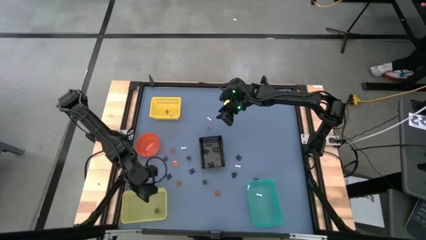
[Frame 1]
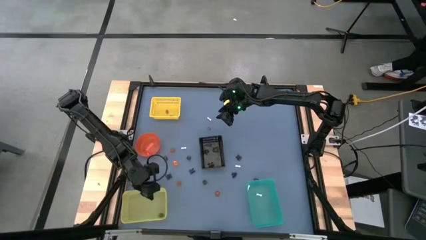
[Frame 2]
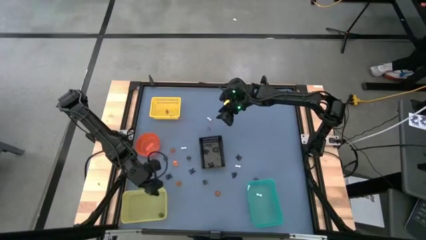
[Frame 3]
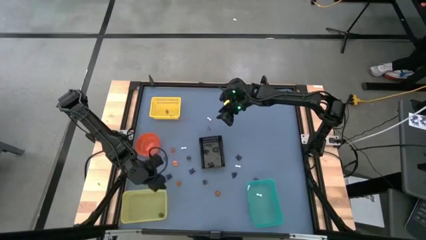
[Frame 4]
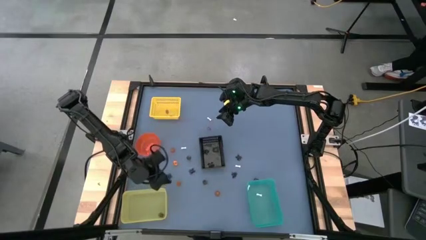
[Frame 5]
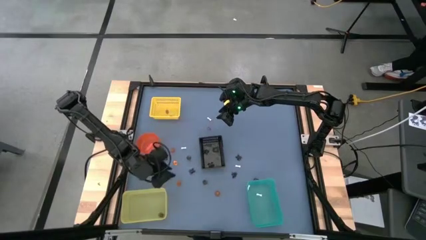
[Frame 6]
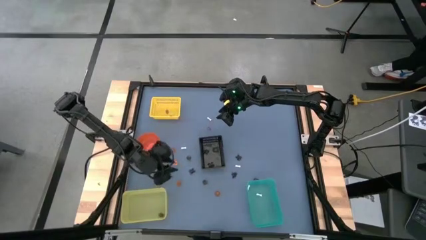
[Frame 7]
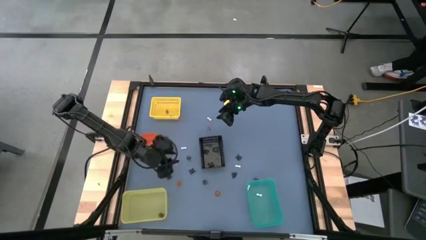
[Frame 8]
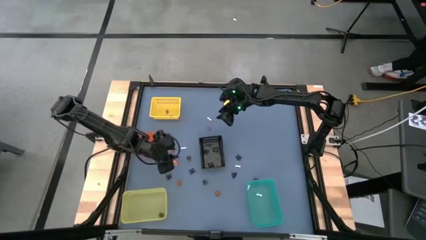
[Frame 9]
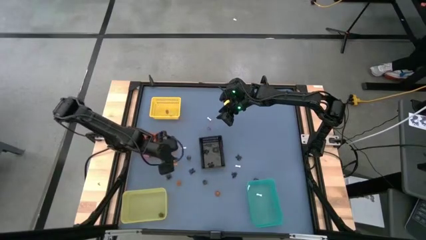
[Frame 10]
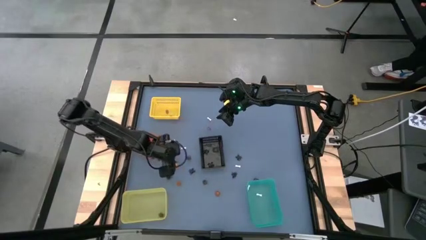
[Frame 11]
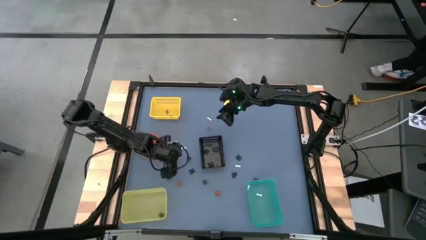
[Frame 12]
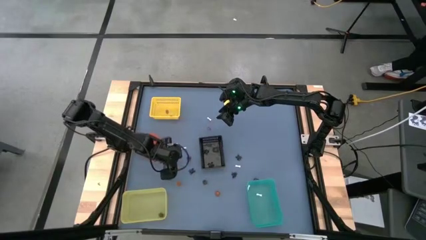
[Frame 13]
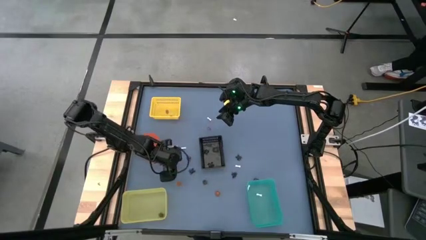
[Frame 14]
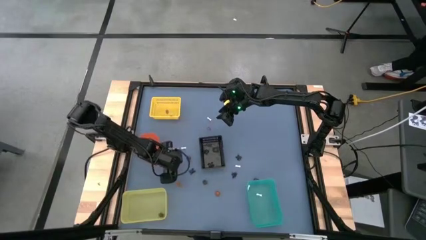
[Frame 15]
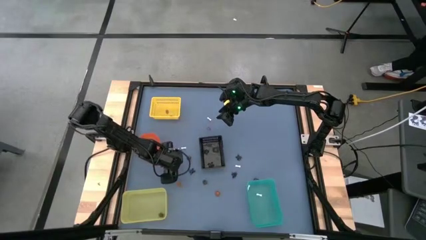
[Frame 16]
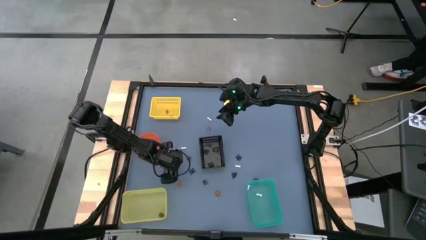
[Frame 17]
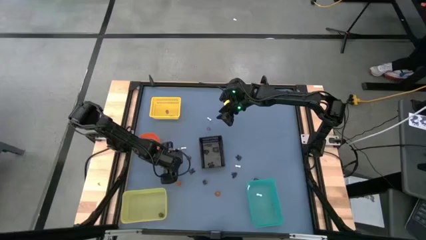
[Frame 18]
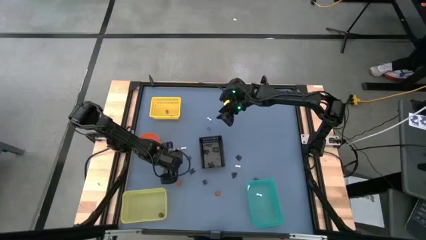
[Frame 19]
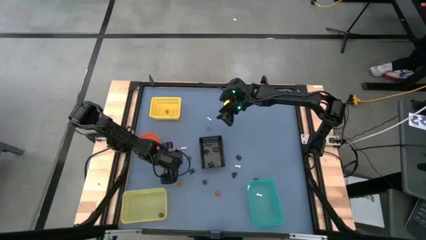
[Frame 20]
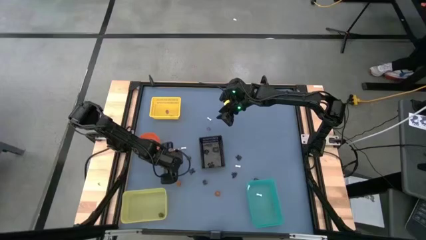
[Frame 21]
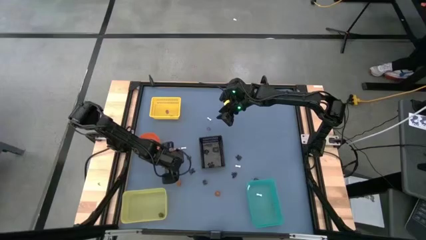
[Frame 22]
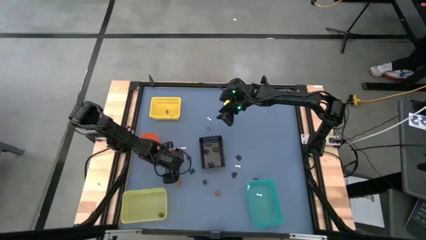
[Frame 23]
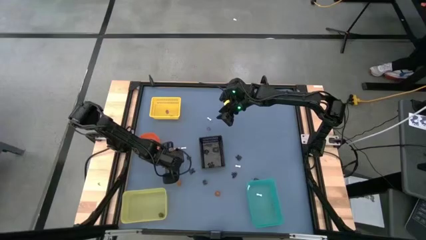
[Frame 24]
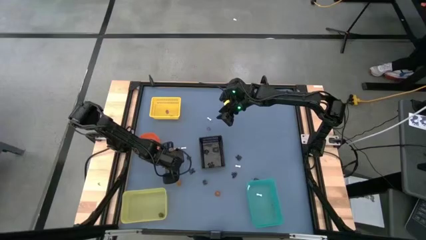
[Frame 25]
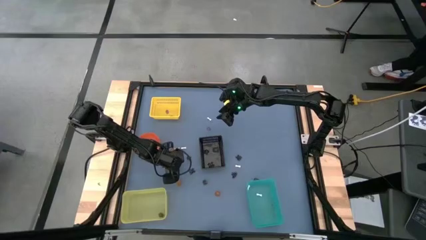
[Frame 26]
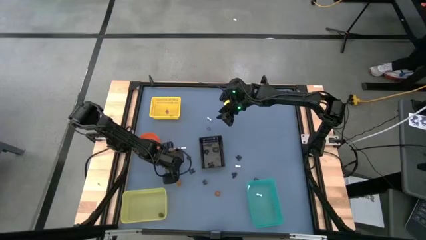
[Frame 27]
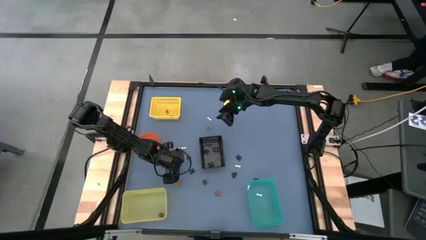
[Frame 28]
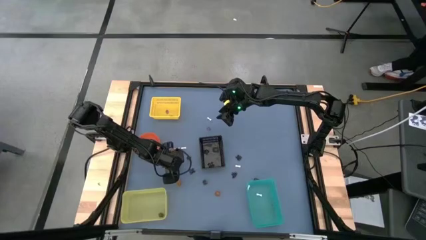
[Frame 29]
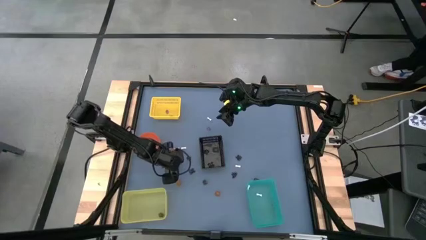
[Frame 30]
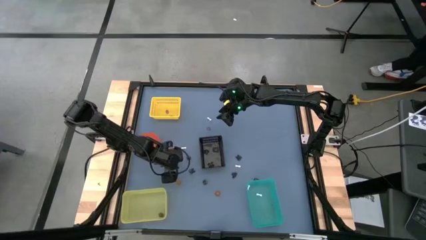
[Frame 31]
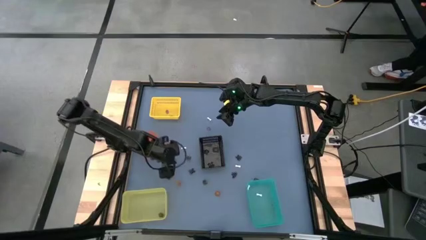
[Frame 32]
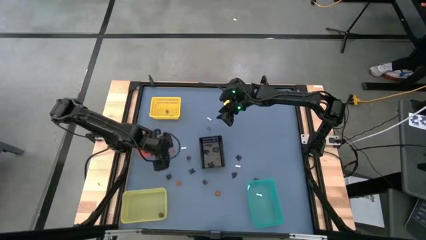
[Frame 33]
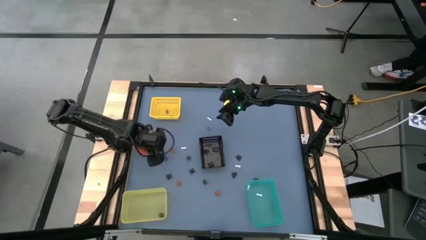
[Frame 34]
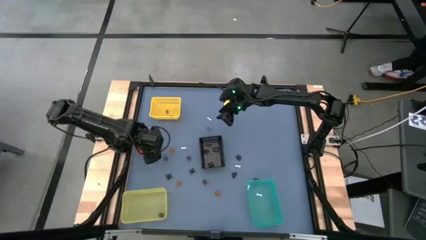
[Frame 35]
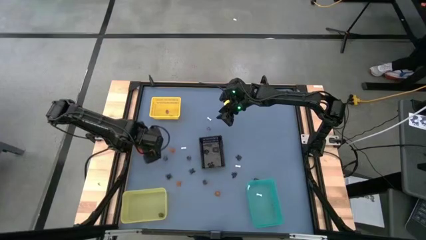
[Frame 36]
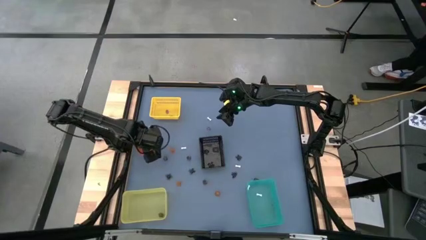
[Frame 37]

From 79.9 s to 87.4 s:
Task: Sort Halloween decoration
Put the orange pumpkin toy into the orange bin

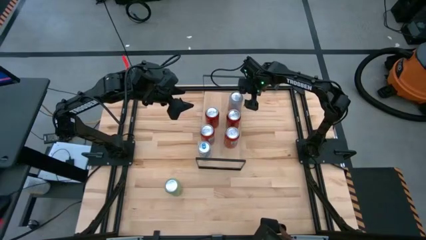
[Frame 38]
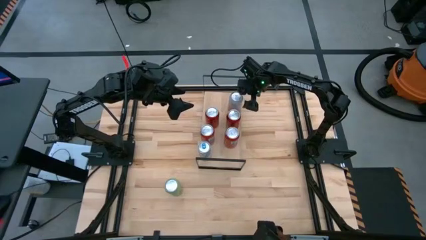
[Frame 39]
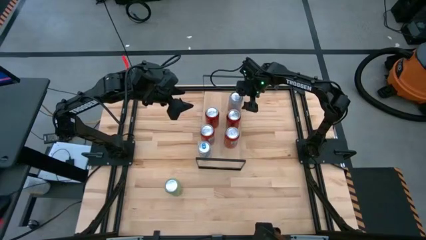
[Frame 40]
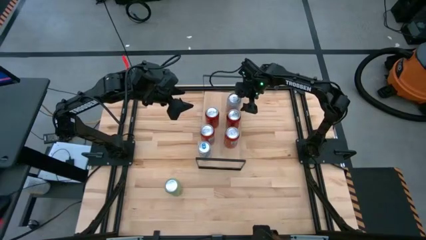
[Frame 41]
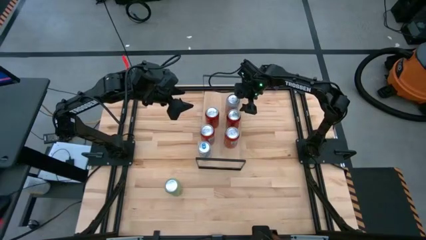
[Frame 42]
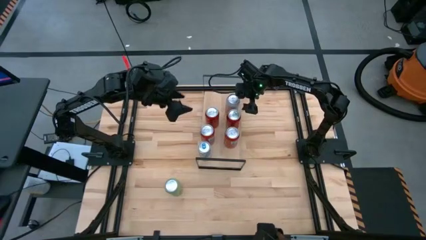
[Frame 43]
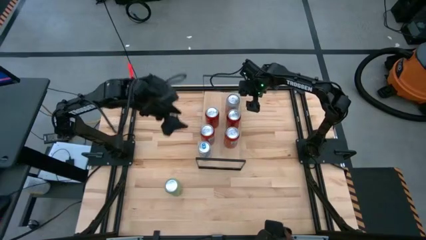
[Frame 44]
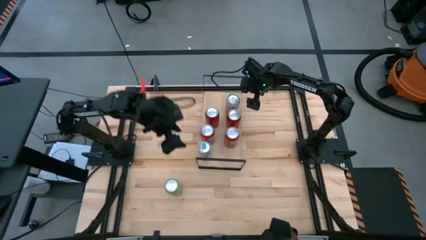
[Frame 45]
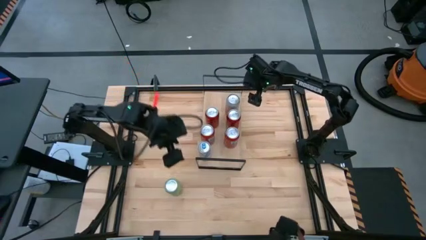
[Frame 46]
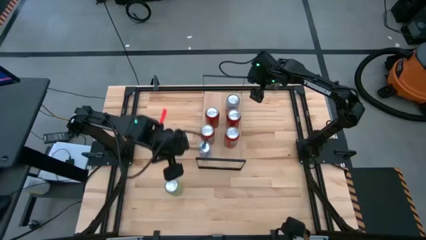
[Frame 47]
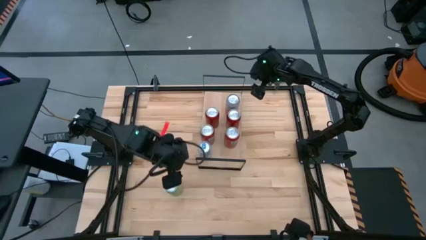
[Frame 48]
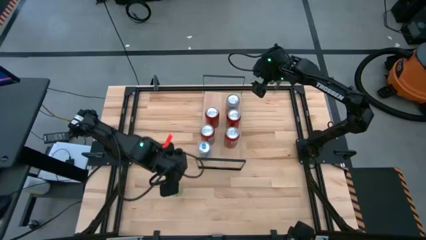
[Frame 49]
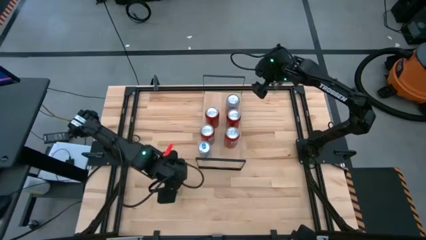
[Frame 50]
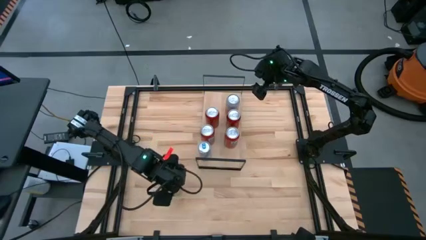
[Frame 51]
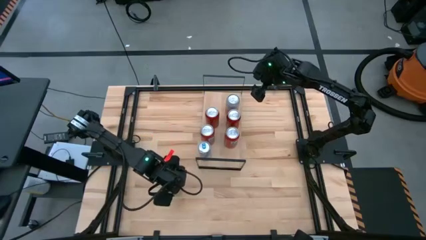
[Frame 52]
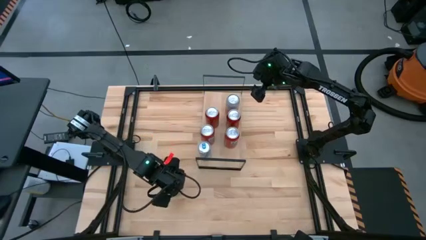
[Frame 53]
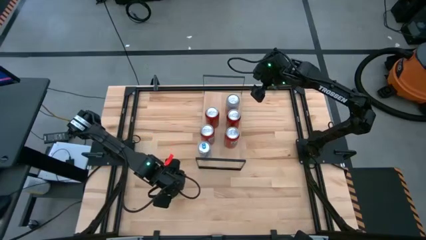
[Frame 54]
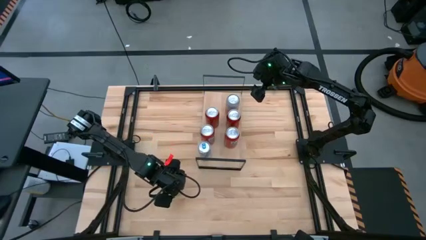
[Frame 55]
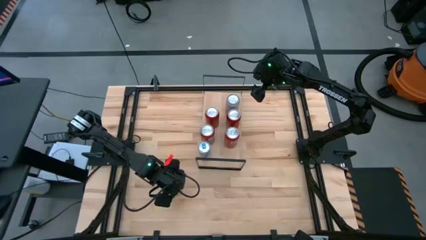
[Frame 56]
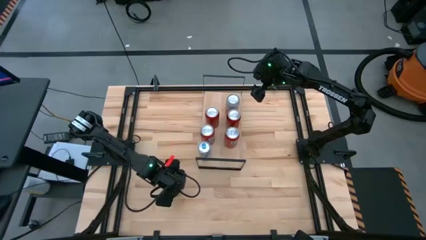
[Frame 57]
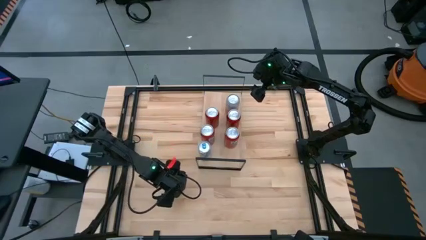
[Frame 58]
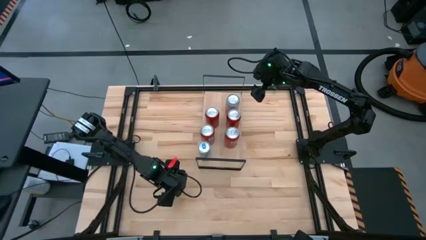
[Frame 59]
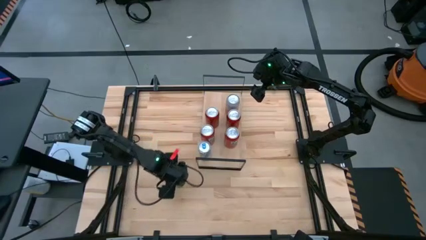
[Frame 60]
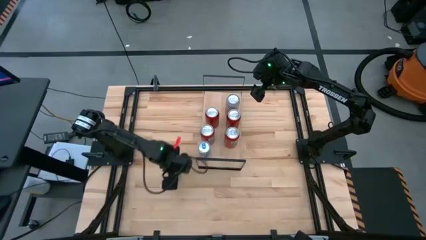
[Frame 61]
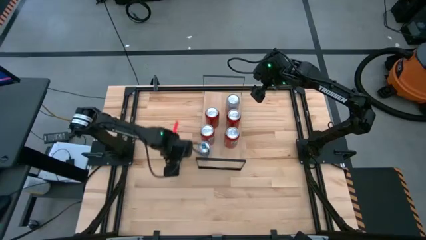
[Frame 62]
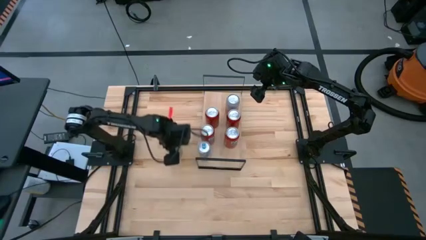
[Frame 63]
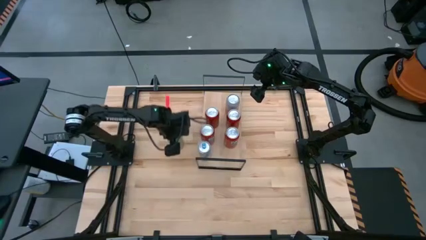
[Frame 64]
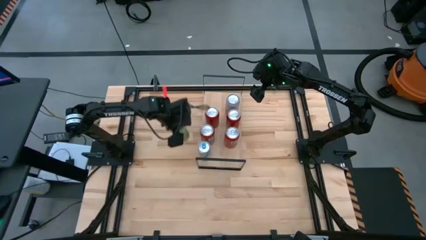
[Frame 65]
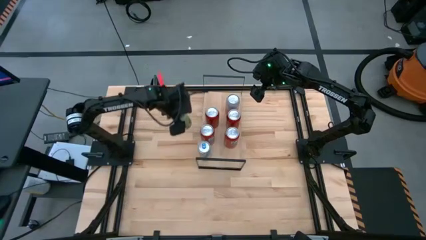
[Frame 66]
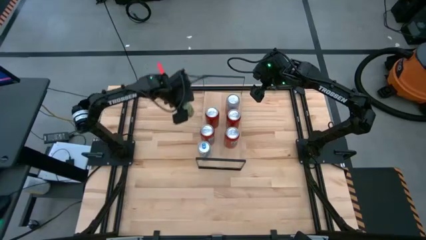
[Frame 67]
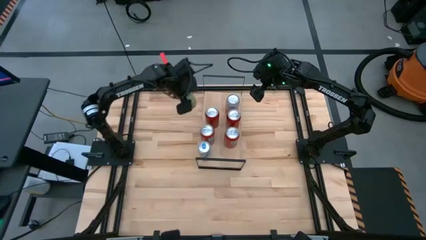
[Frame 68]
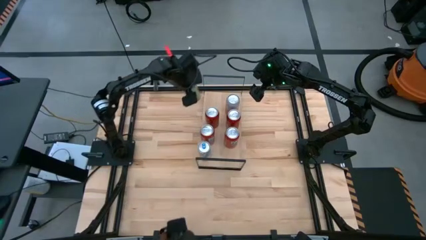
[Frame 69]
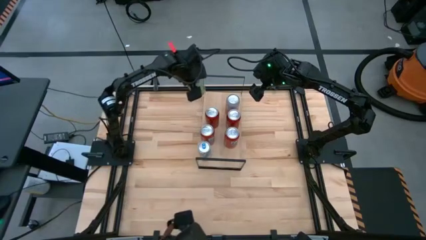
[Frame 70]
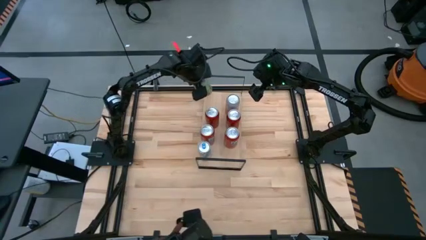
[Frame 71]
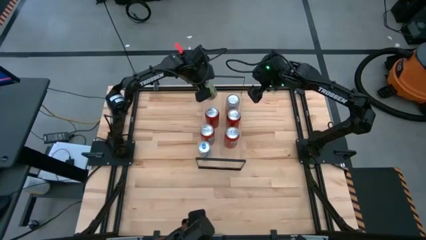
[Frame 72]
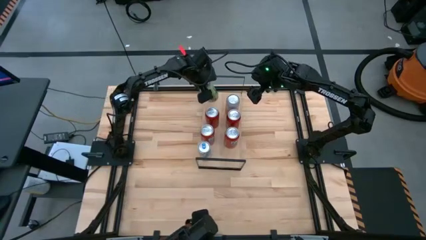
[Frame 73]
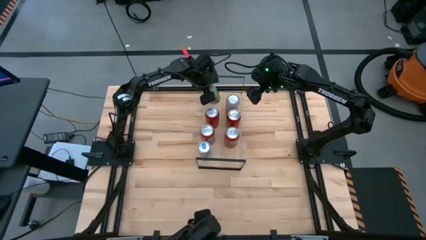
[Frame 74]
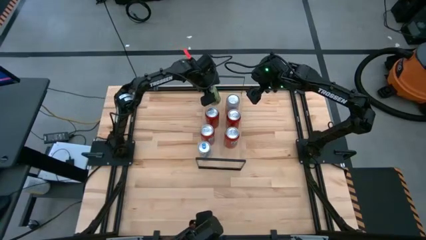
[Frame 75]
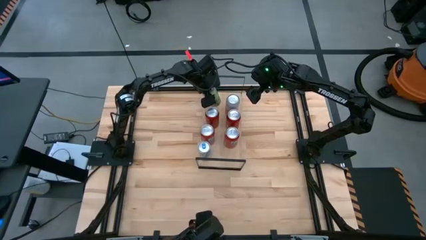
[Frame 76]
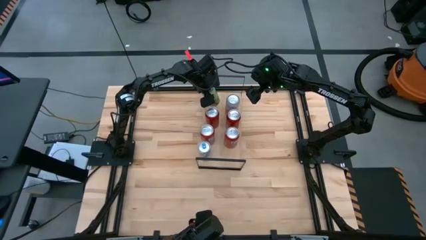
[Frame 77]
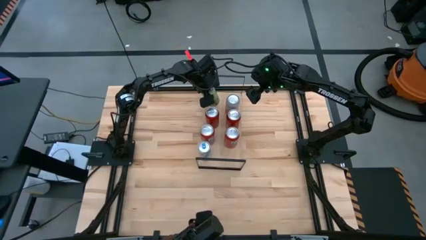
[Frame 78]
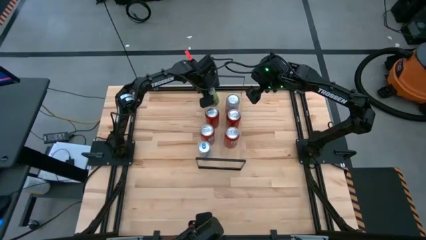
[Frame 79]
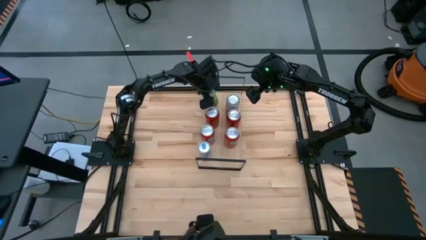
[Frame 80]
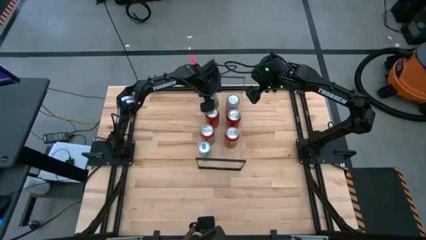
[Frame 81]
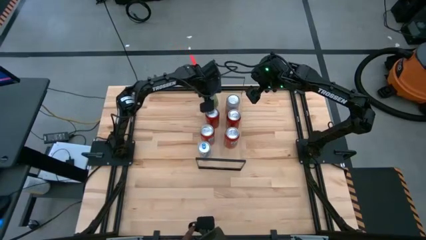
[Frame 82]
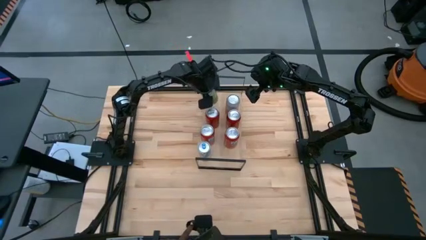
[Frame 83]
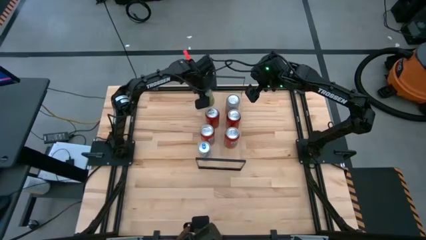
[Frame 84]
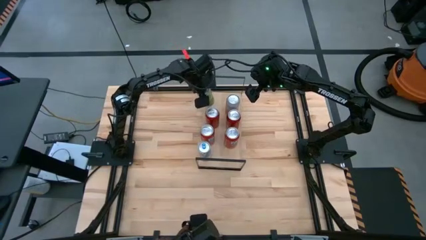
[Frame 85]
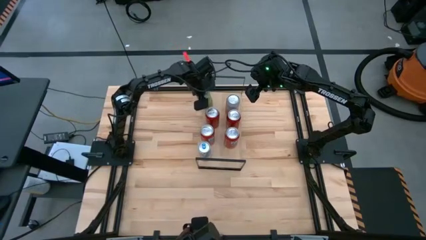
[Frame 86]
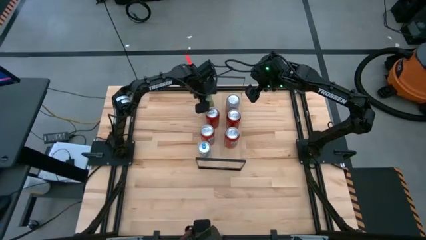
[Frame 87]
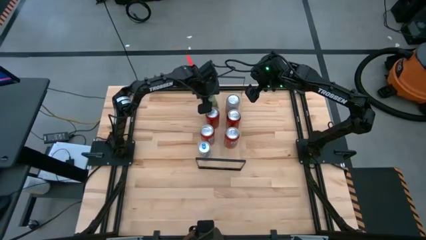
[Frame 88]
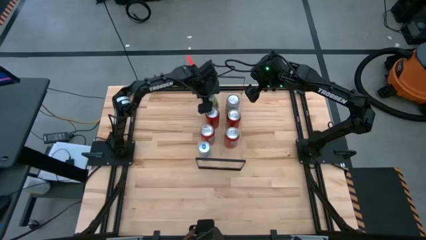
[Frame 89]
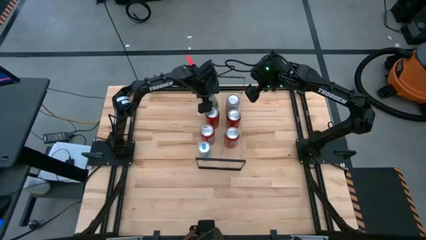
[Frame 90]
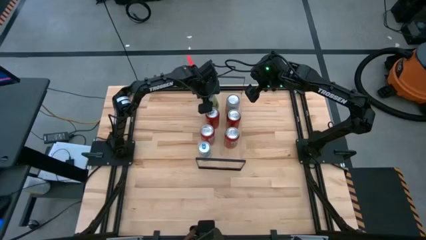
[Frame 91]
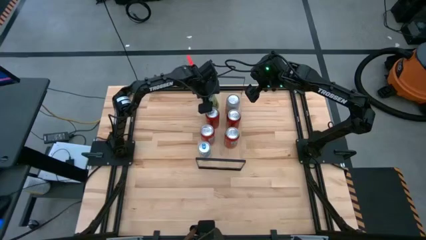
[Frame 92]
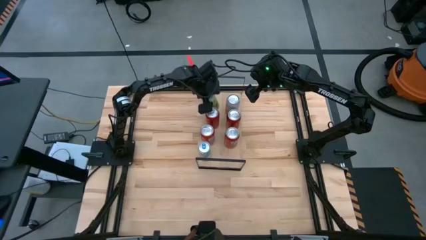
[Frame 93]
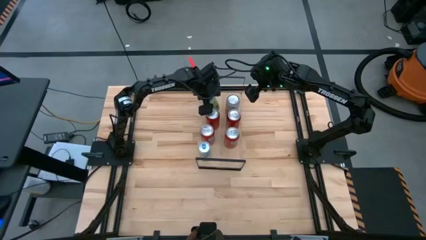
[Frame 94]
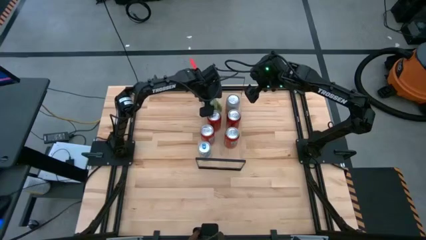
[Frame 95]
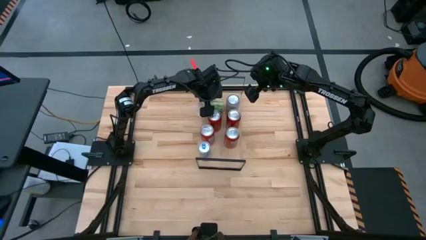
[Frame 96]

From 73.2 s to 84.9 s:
Task: Place canned beverage on shelf
Put the green soda can on the shelf
